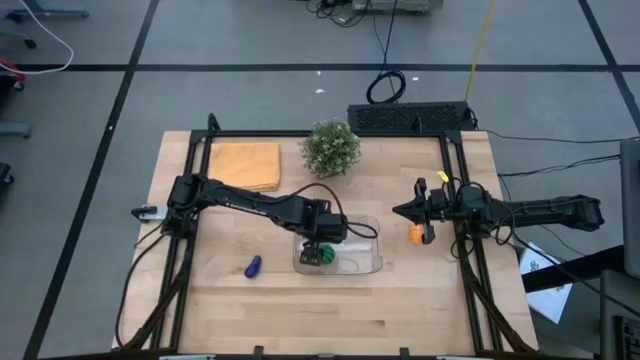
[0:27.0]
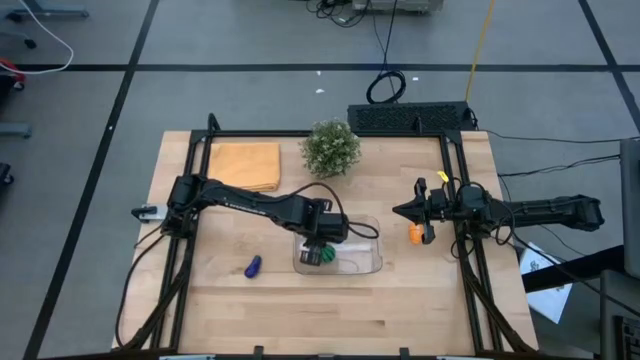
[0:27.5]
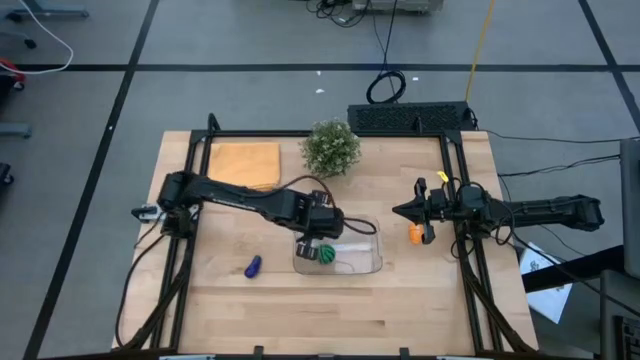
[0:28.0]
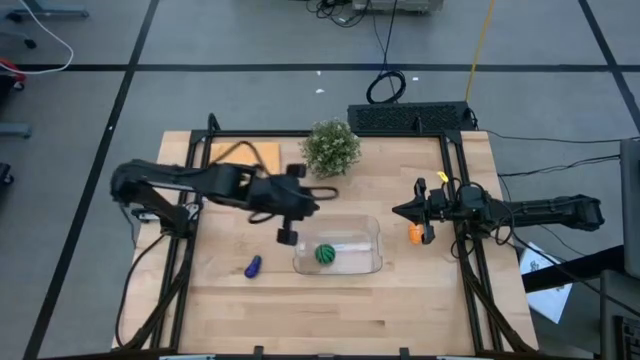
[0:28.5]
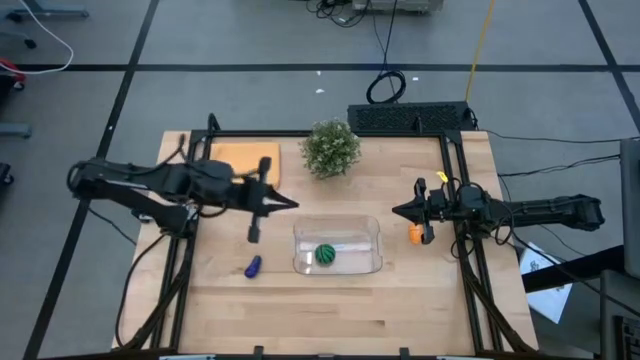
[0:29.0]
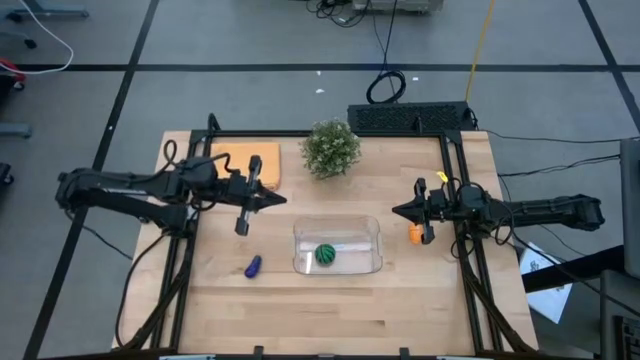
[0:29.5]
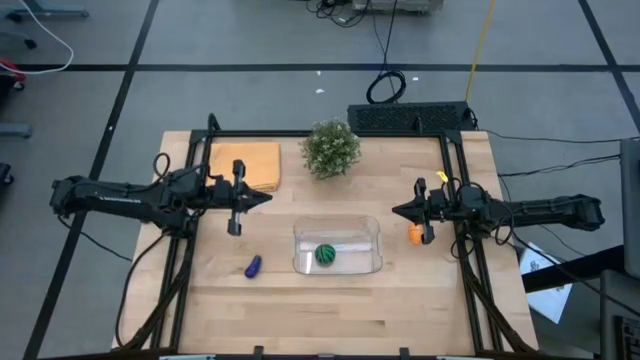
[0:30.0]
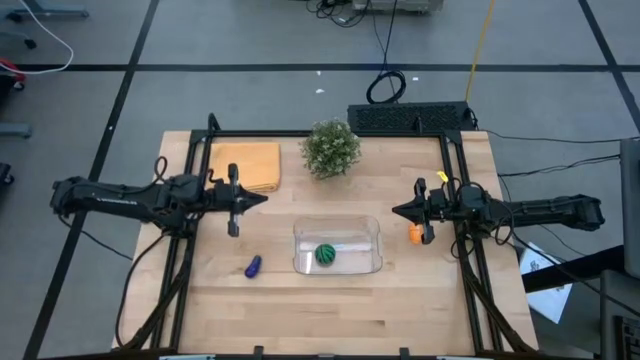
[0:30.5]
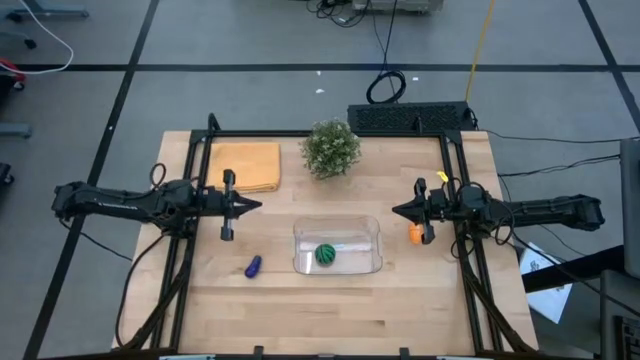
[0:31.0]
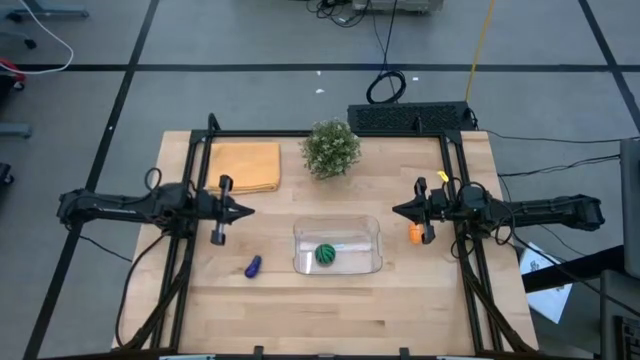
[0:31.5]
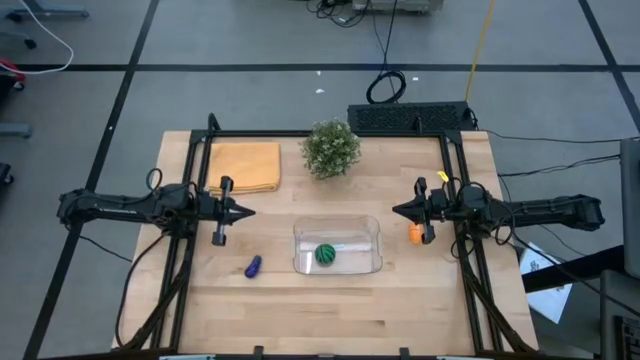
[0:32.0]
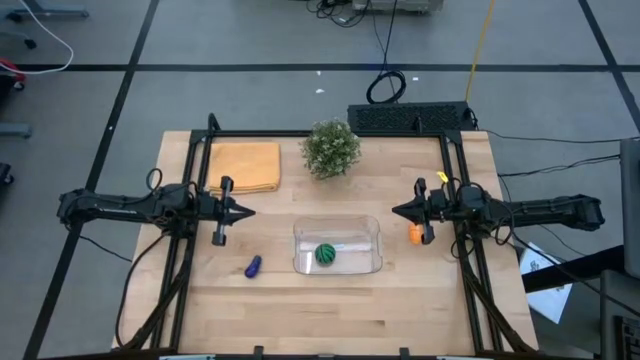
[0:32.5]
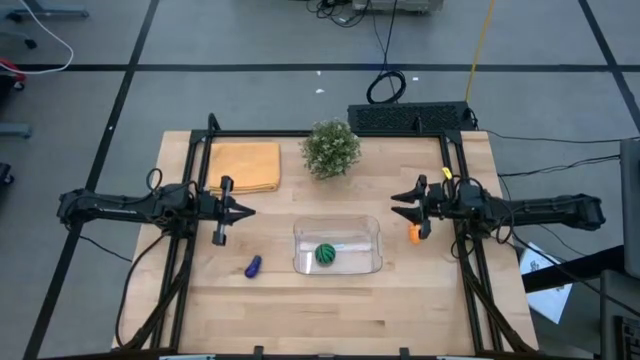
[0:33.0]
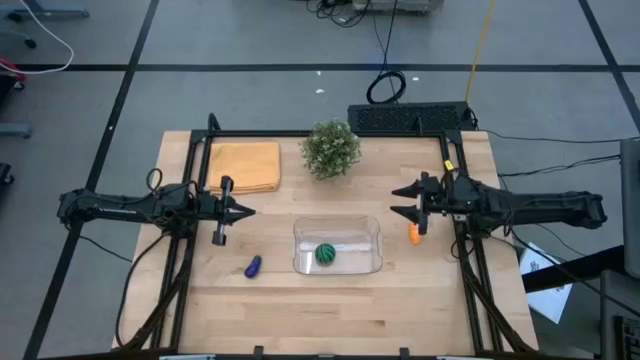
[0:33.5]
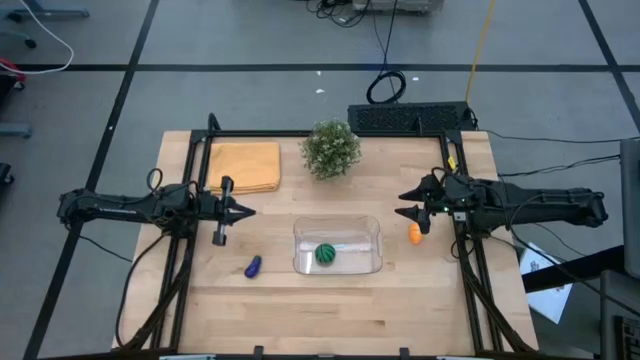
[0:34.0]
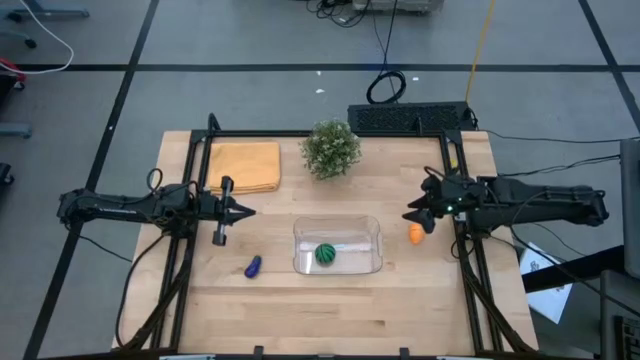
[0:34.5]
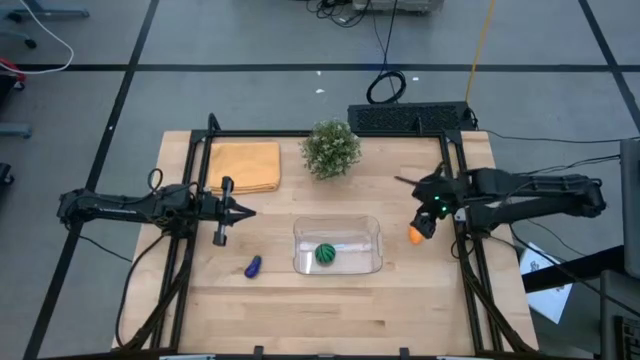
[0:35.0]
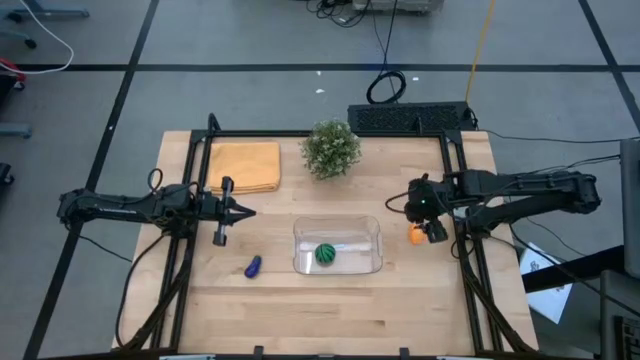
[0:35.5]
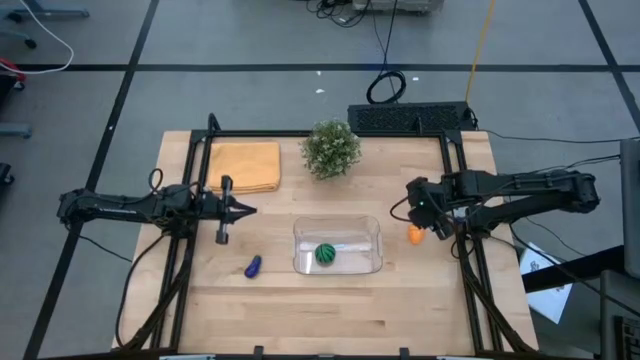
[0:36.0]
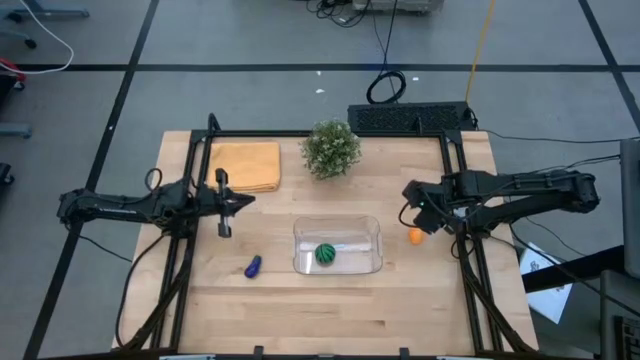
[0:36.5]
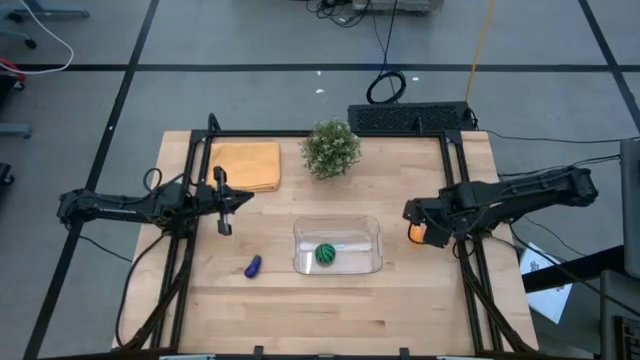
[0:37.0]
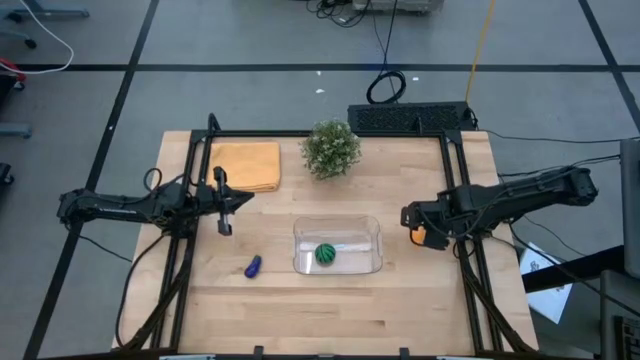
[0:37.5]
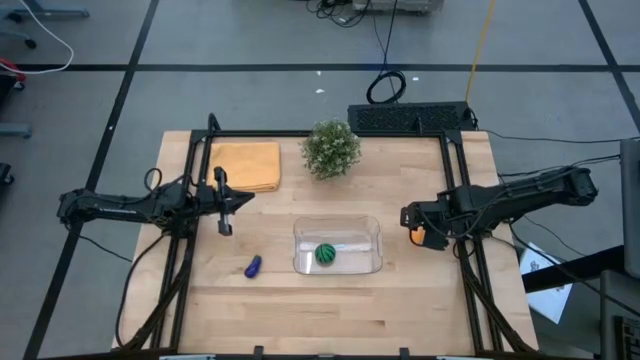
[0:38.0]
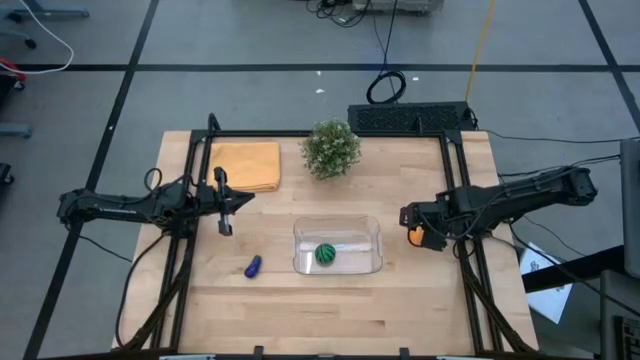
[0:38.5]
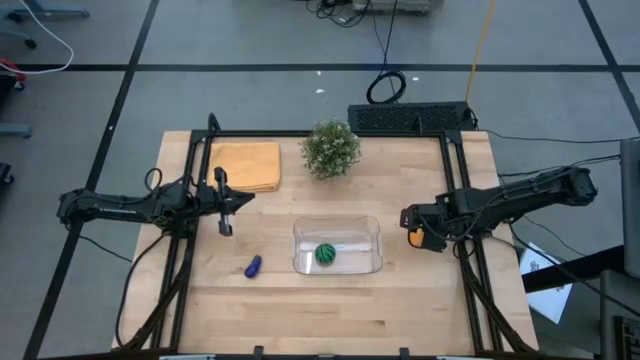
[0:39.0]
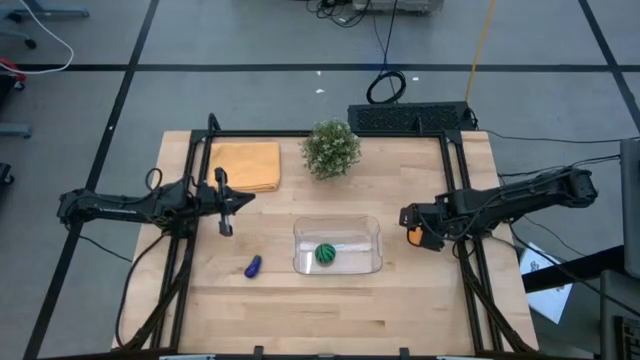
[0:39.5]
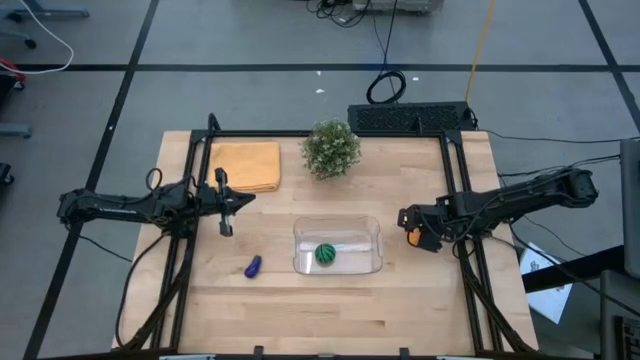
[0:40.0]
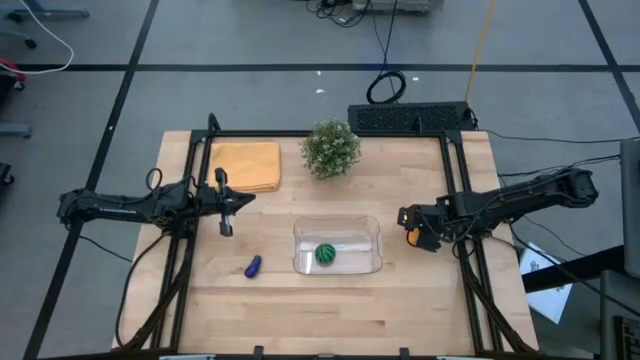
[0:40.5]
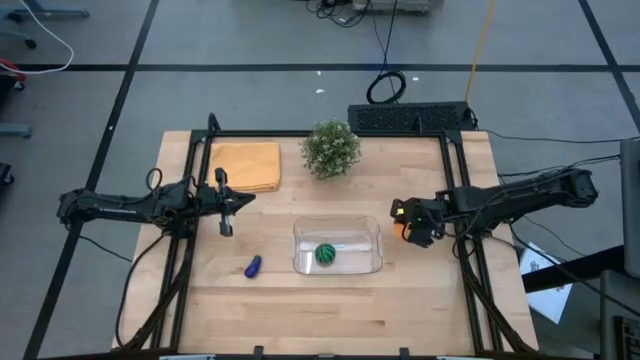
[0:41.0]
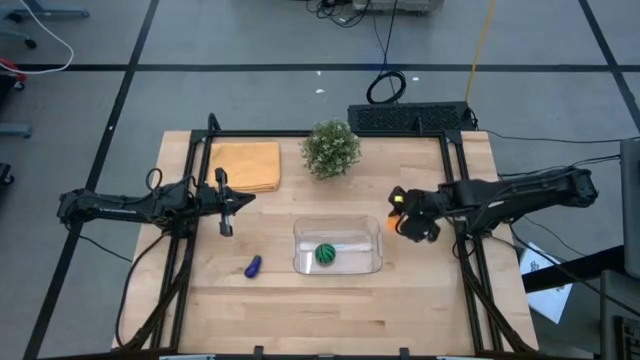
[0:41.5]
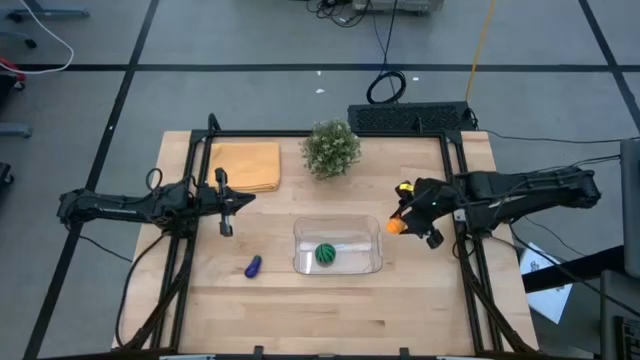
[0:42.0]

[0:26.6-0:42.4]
Task: Pick and placing Produce into tupperware
Put the pumpkin into the transparent bin

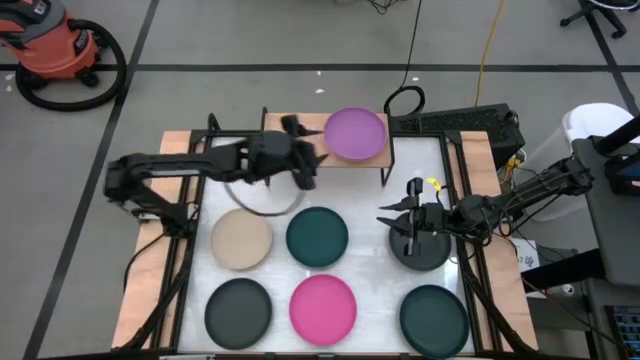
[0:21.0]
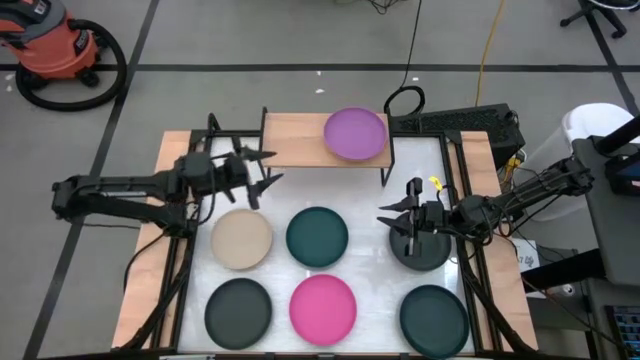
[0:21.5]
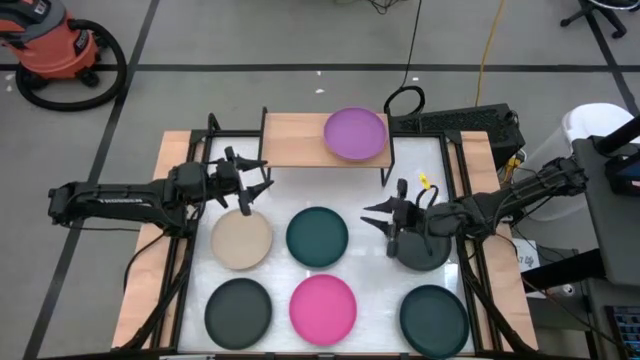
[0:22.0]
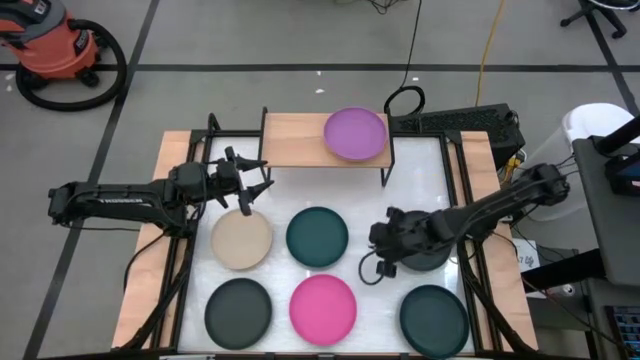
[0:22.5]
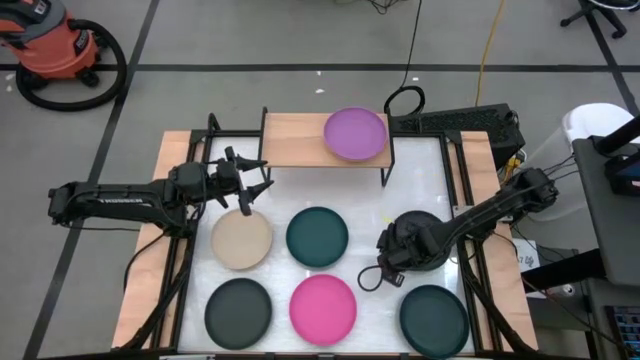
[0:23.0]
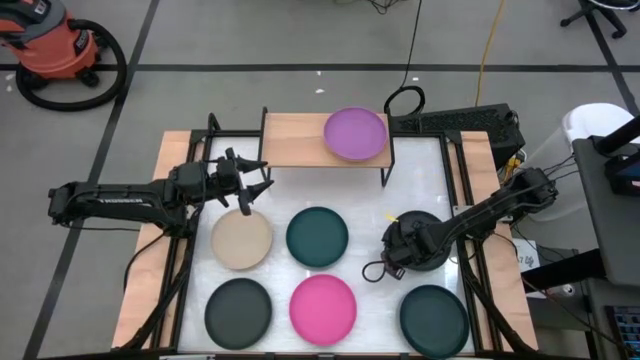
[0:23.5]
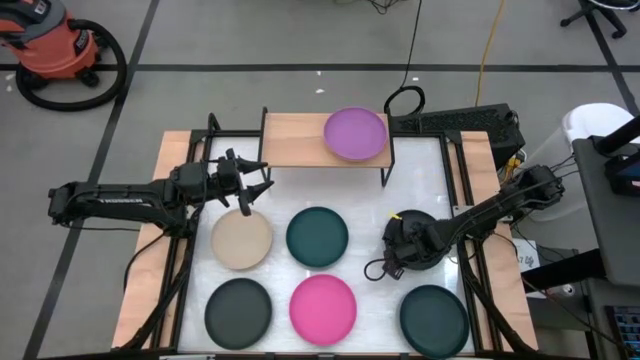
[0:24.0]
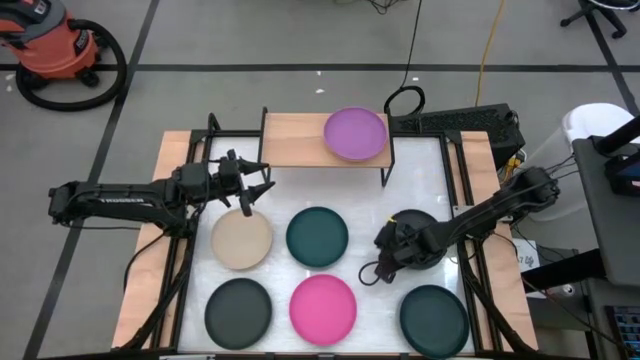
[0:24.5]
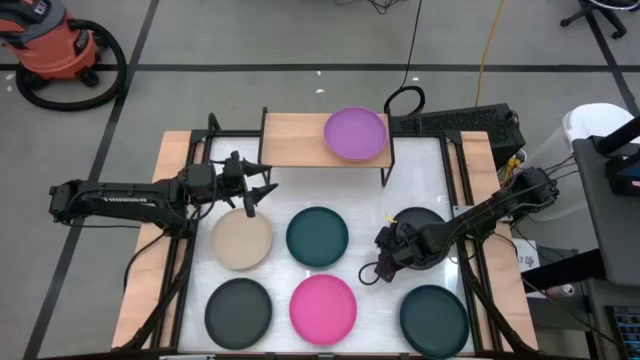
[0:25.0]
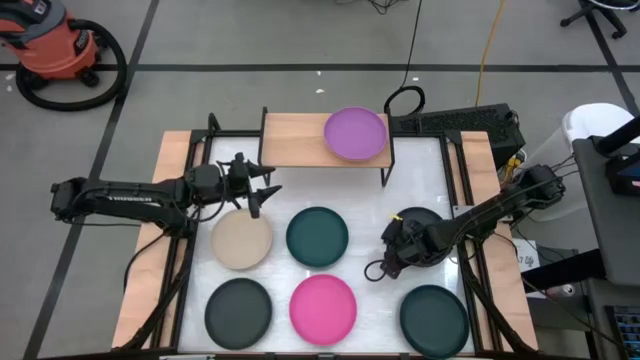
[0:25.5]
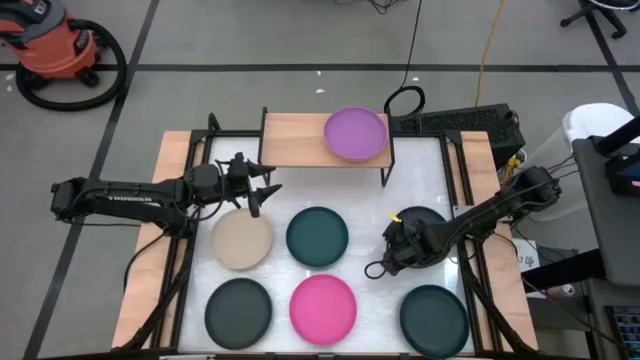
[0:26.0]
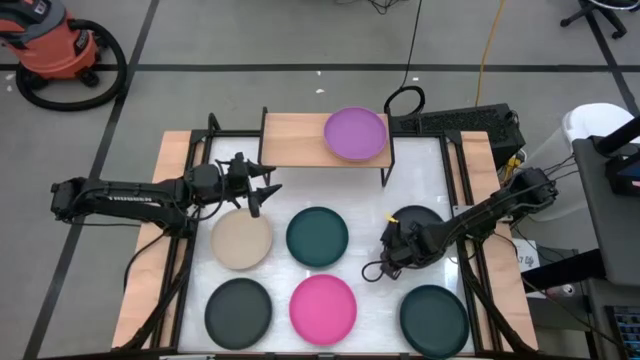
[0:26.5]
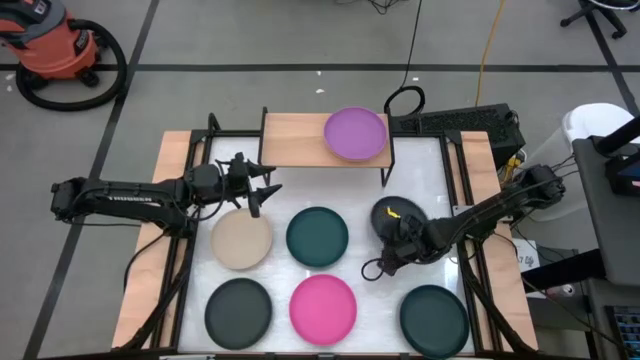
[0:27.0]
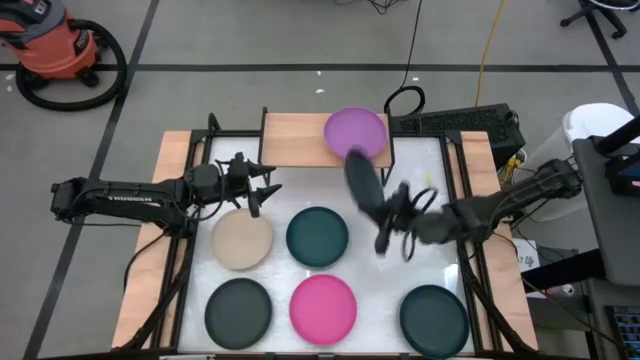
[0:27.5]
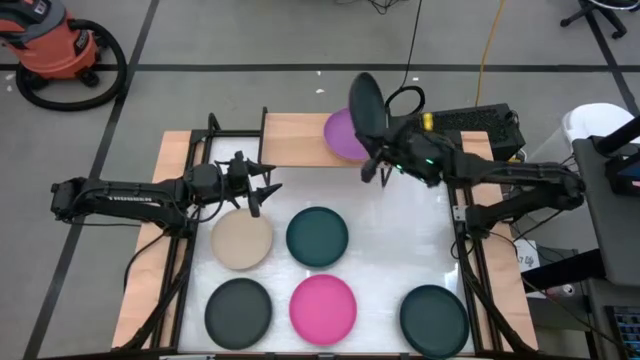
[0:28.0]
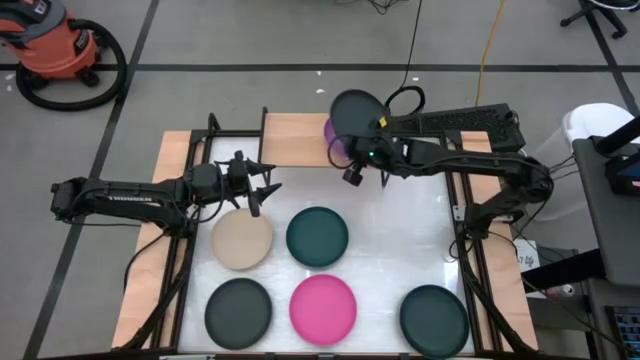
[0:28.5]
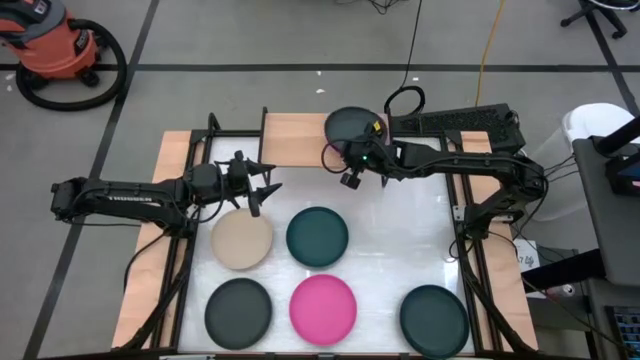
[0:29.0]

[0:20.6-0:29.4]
Task: Place and stack plates onto a shelf
Stack the right black plate on the purple plate
